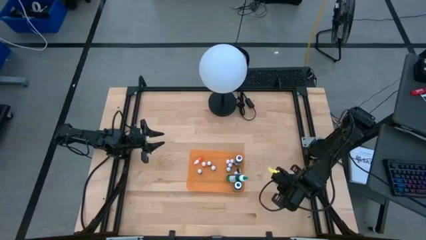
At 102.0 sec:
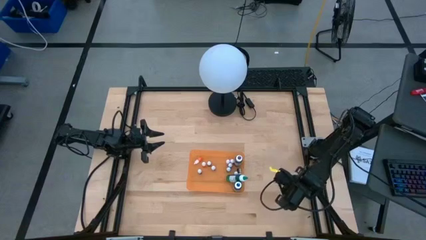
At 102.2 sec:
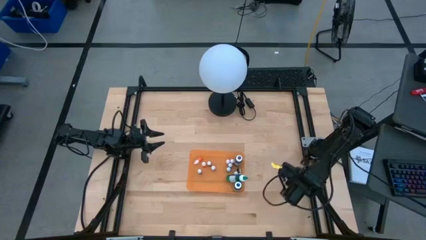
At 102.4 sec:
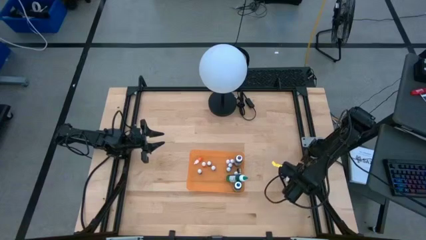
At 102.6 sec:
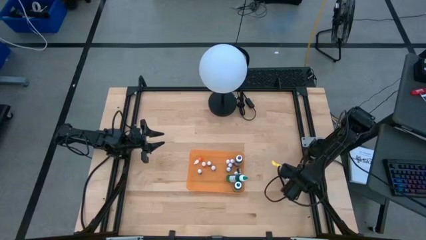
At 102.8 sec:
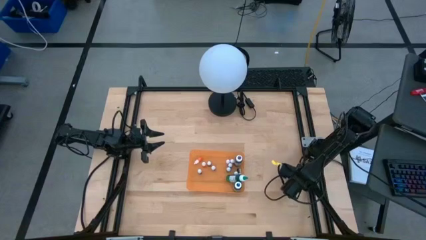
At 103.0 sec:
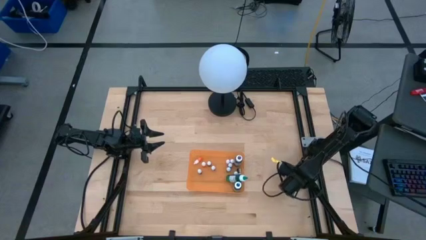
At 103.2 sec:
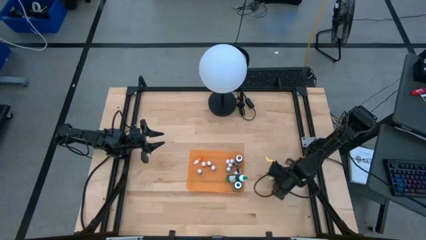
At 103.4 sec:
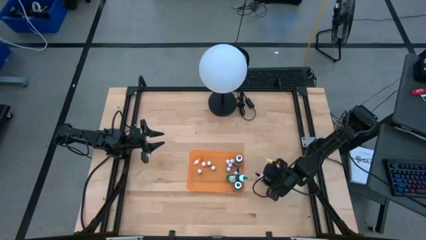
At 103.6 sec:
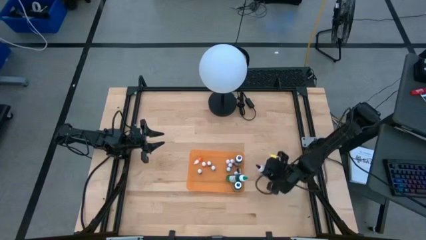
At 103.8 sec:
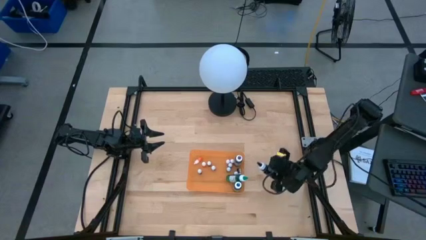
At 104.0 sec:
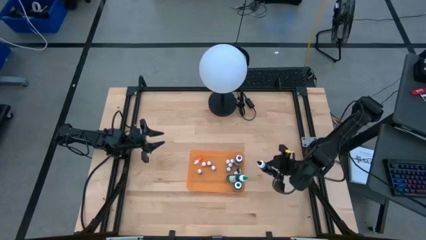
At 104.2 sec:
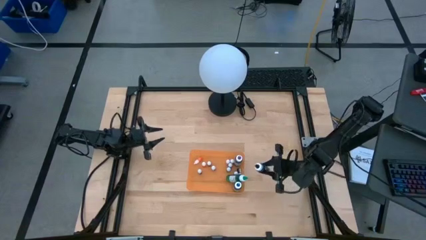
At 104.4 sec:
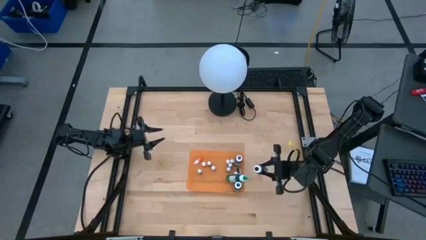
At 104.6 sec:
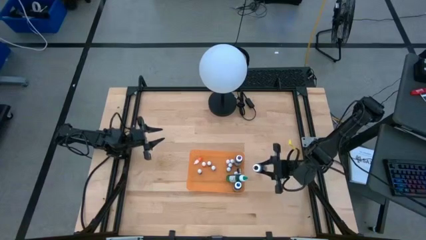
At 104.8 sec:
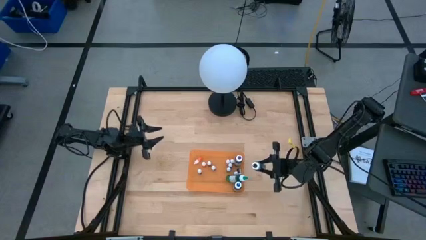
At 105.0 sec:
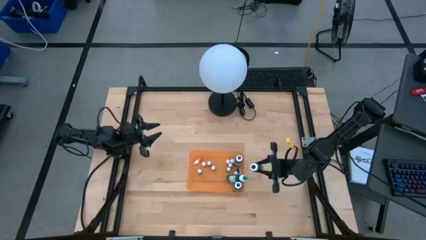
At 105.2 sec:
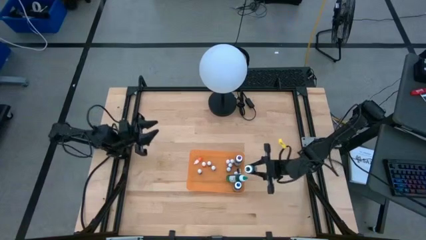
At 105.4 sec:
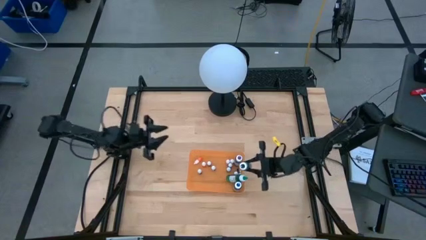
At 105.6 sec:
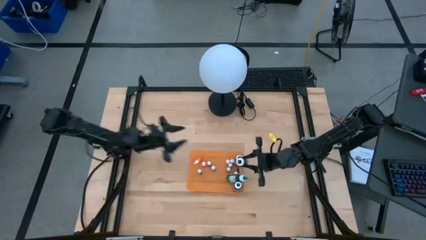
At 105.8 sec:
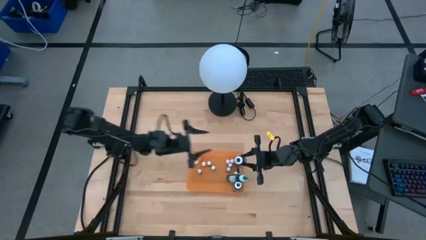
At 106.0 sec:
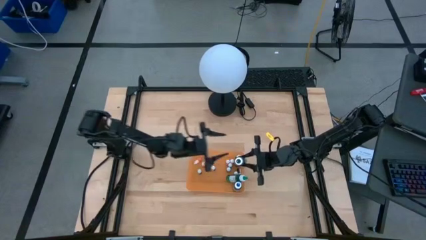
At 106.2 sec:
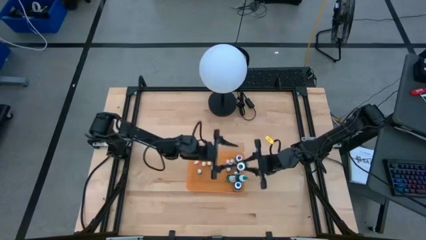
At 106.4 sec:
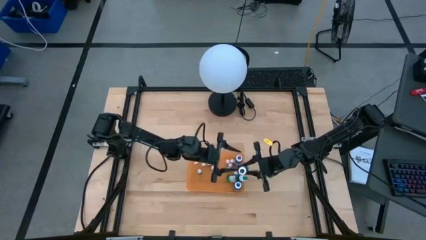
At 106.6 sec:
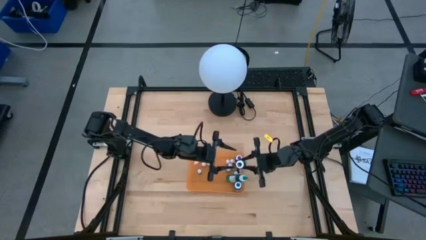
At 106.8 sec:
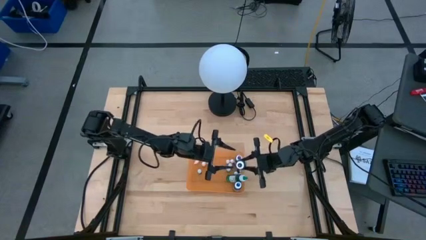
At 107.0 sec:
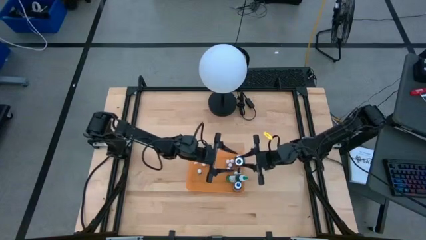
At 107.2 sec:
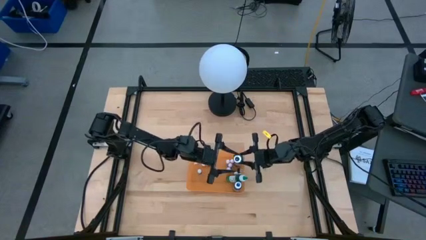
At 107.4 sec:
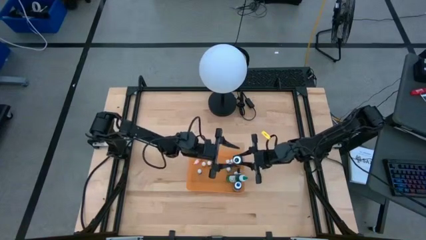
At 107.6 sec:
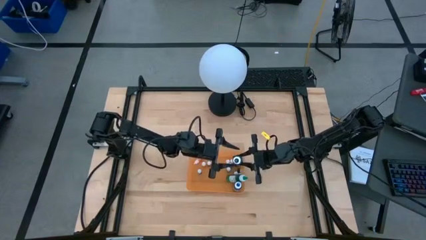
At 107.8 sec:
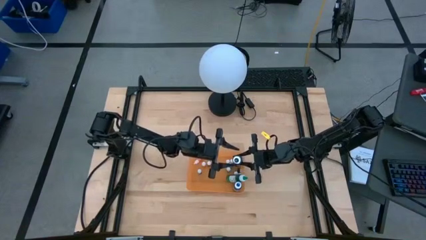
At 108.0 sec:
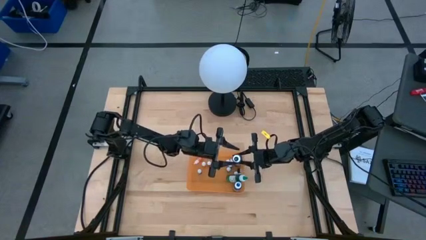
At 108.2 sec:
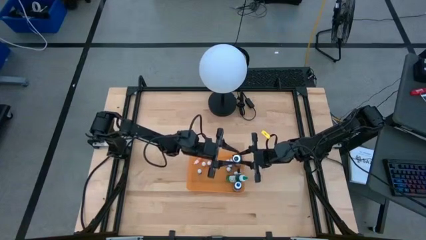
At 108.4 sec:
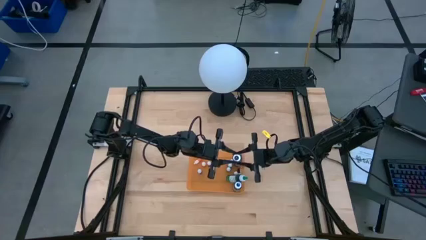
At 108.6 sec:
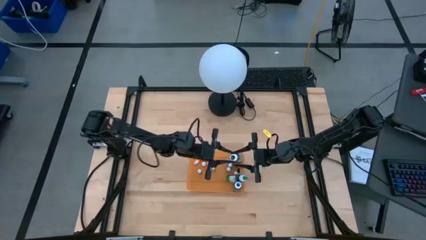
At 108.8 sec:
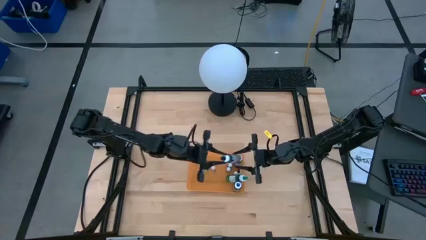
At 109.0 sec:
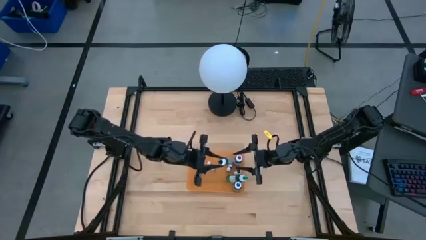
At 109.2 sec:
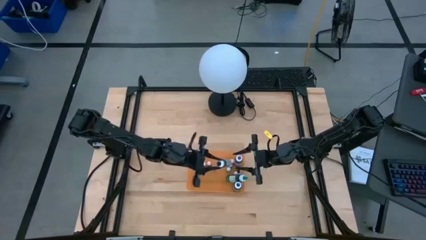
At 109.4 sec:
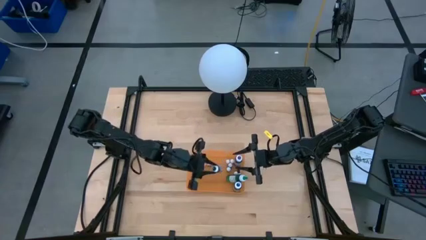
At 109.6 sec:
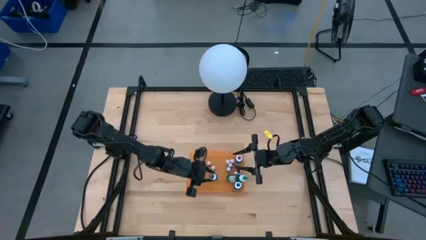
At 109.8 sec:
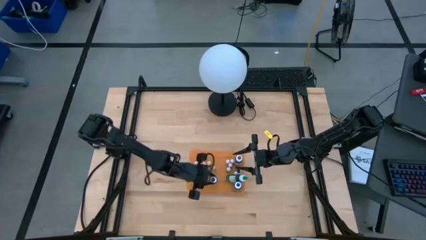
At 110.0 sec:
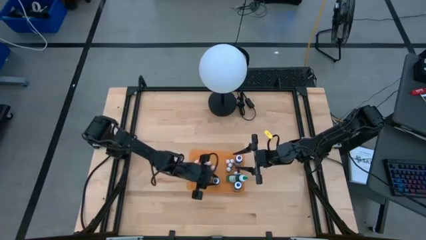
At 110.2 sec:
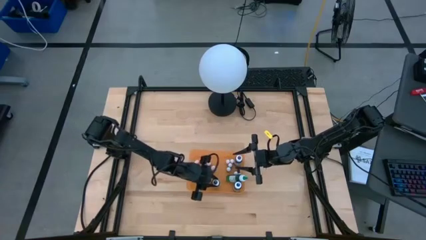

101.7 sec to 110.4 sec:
Task: Pick & Place food coloring
Put the large black food coloring bottle into the orange container

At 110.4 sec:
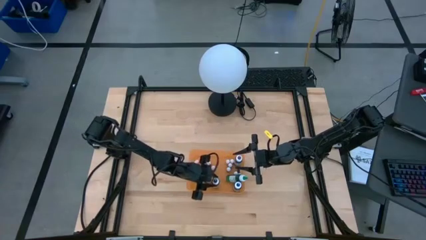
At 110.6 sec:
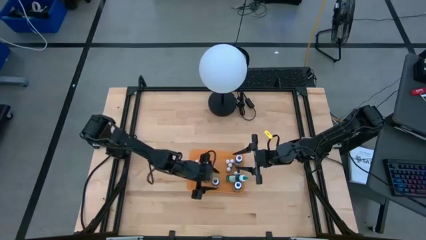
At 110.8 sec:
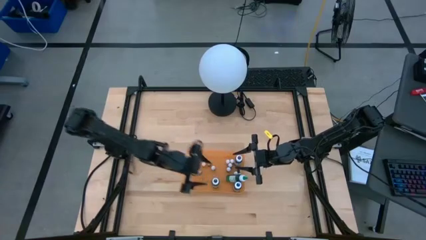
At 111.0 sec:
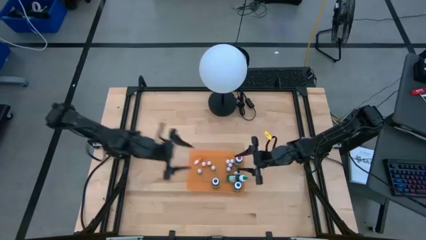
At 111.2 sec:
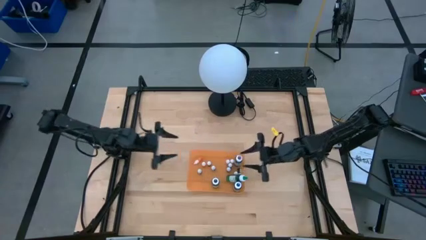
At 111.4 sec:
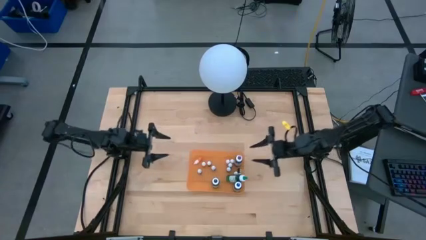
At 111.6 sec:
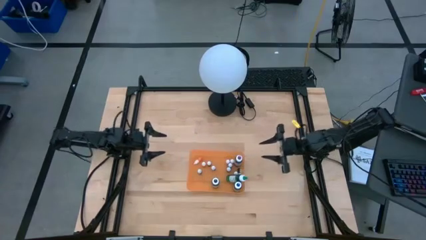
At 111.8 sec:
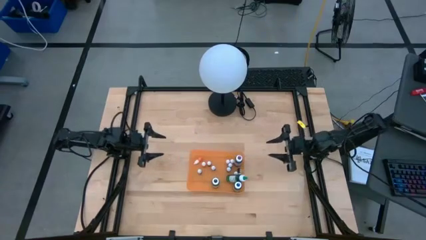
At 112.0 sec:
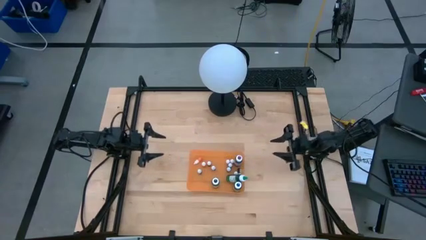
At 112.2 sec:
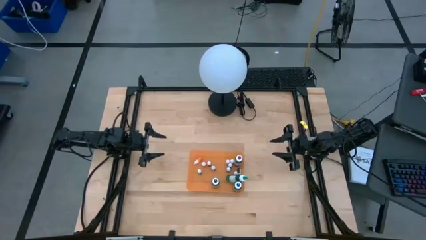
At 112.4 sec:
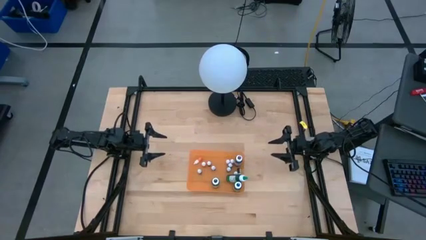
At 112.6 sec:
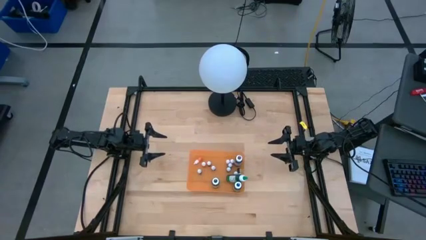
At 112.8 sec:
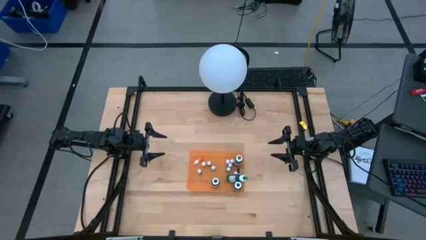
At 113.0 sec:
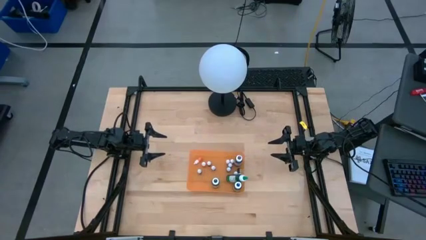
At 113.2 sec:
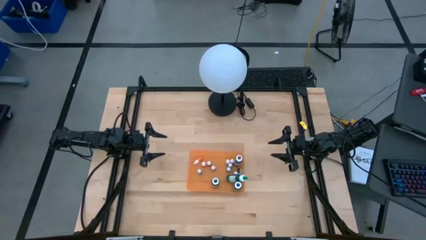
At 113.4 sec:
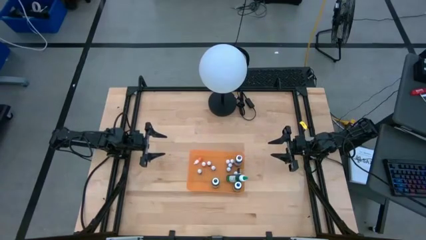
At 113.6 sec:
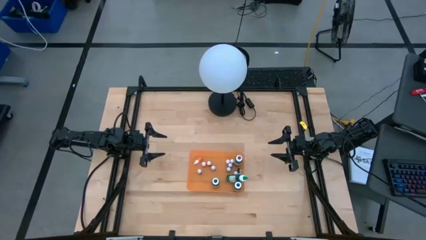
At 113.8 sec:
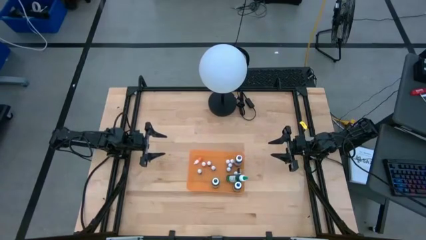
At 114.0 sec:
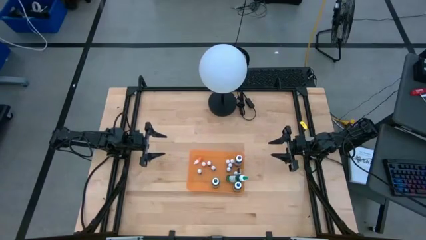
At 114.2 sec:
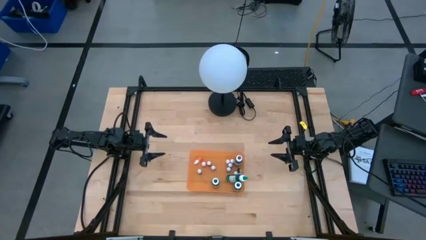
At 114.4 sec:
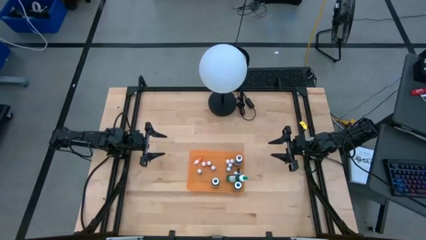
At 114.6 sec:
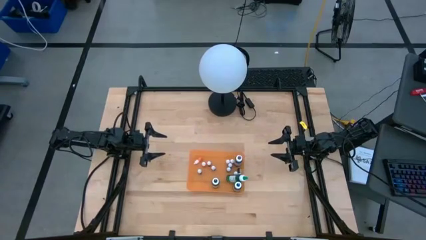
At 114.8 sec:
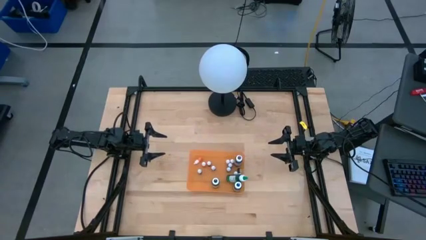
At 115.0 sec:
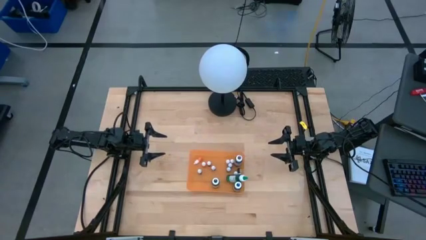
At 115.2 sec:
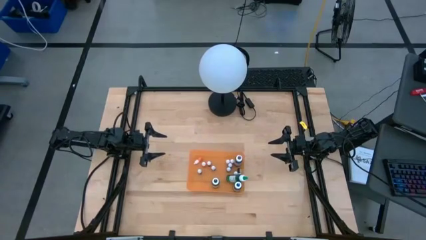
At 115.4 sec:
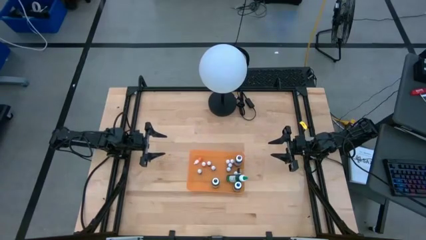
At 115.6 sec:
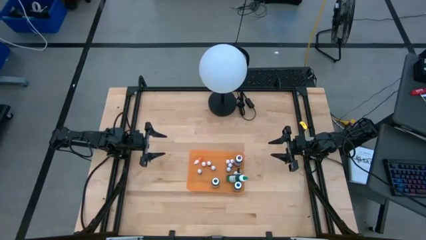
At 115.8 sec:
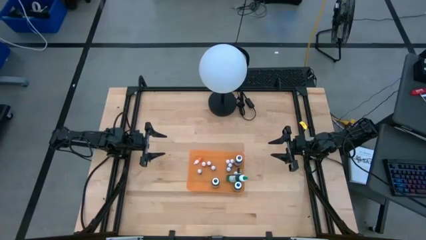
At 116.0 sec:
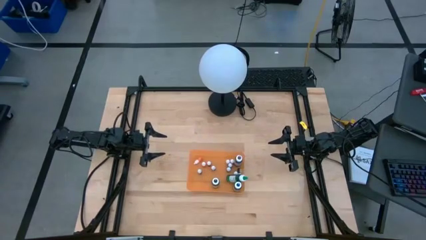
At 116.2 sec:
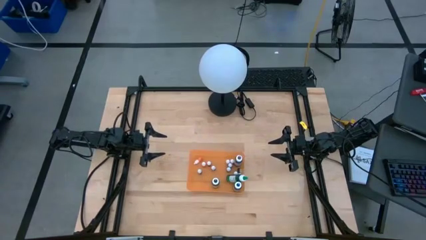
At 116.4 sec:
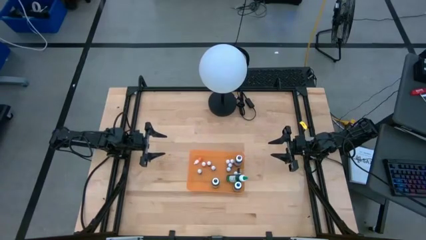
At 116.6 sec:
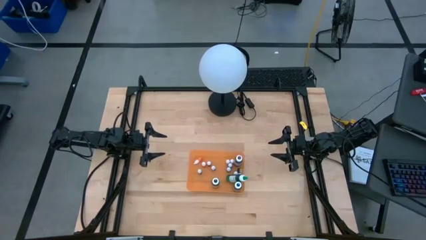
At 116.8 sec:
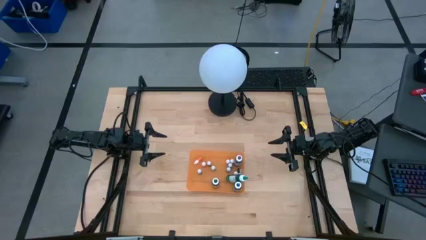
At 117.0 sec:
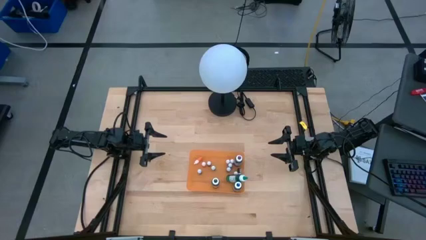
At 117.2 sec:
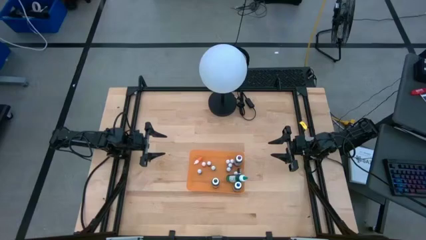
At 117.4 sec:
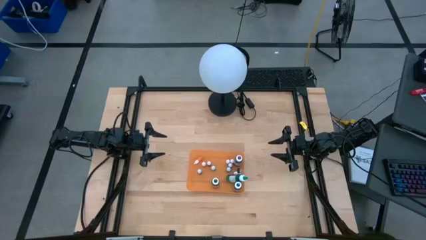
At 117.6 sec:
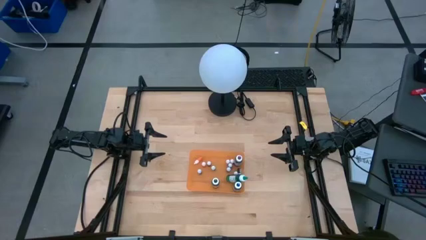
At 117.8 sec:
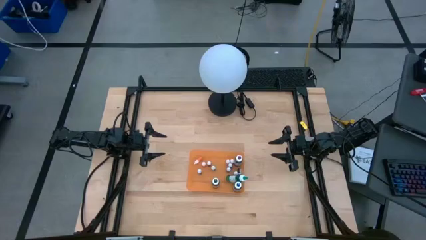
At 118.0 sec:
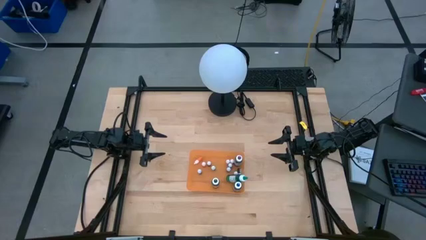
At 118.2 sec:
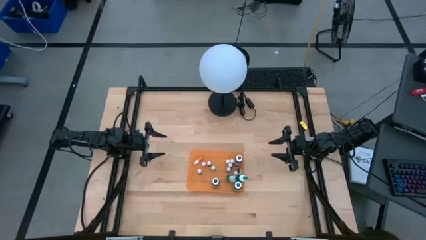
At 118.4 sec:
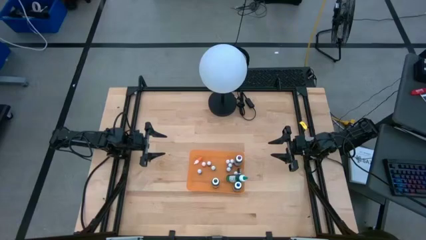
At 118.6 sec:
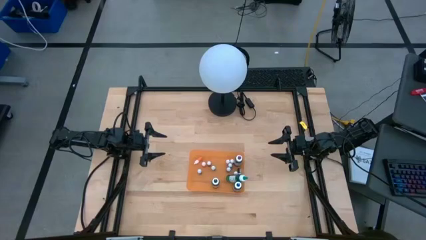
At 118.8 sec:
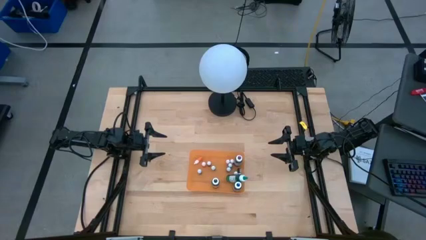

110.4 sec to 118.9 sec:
Return to Home Position
